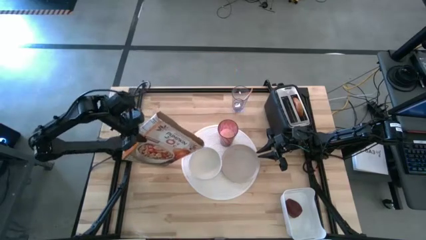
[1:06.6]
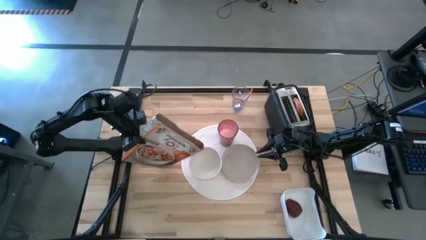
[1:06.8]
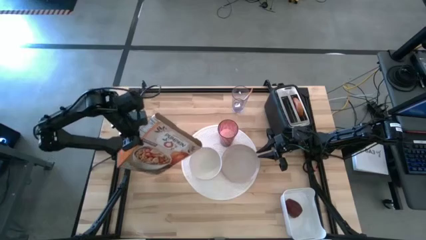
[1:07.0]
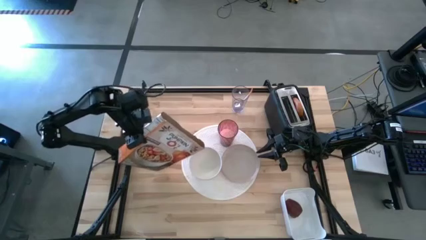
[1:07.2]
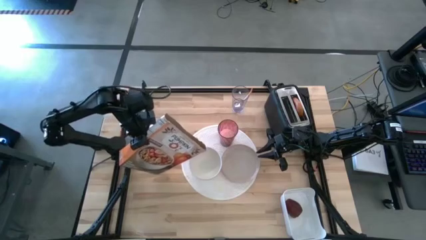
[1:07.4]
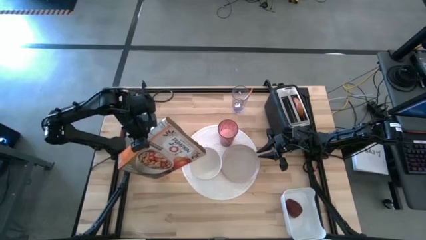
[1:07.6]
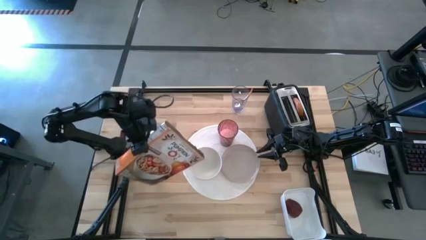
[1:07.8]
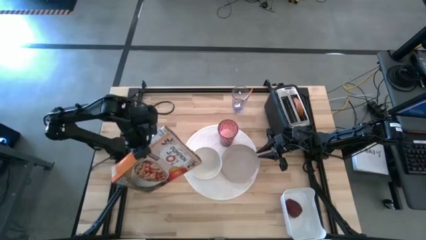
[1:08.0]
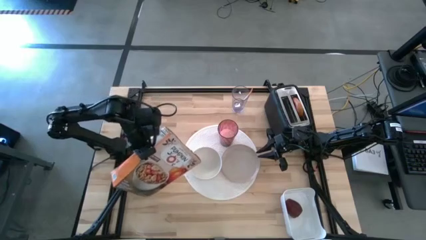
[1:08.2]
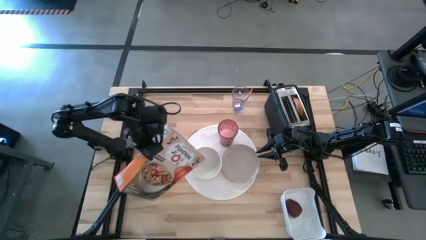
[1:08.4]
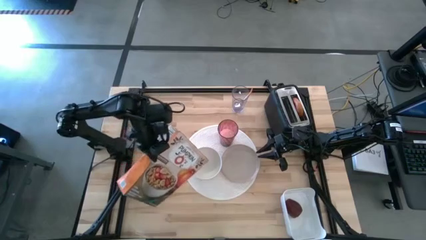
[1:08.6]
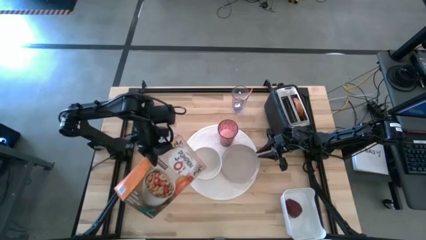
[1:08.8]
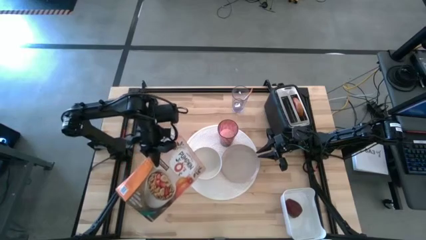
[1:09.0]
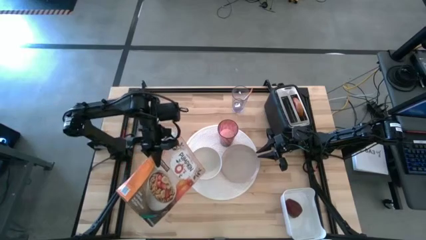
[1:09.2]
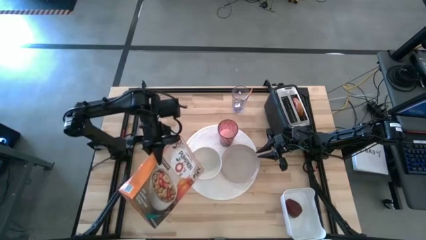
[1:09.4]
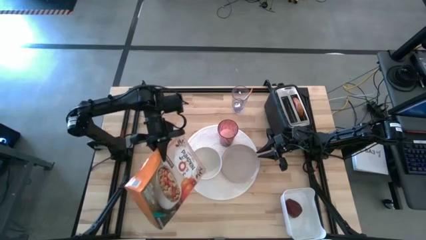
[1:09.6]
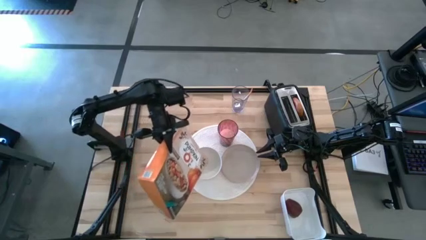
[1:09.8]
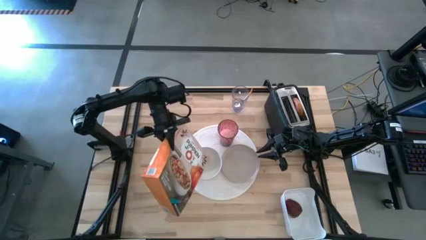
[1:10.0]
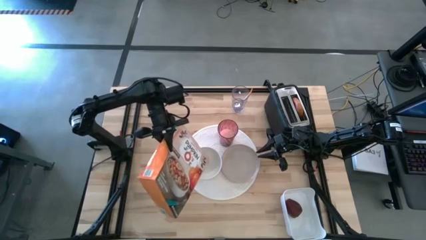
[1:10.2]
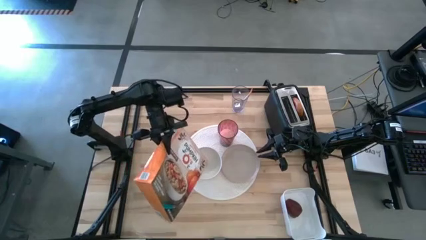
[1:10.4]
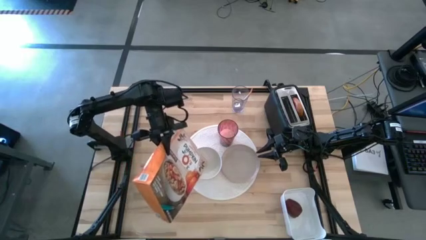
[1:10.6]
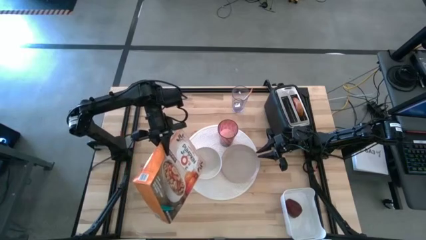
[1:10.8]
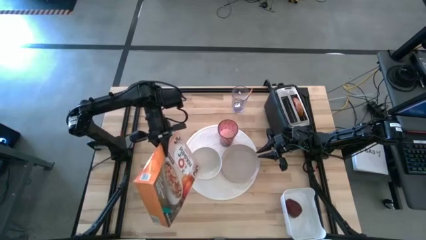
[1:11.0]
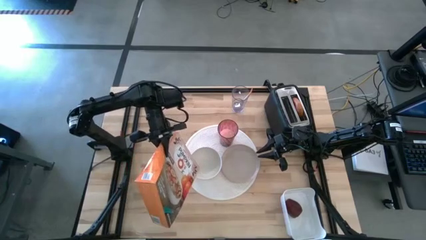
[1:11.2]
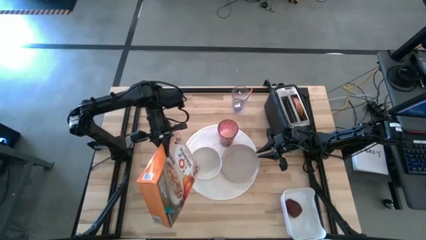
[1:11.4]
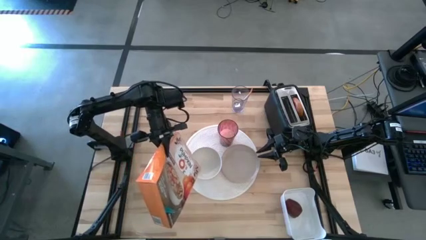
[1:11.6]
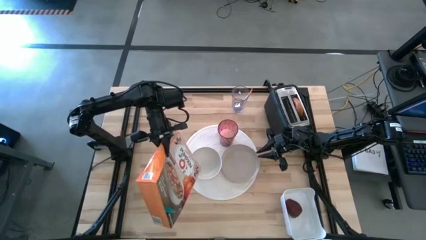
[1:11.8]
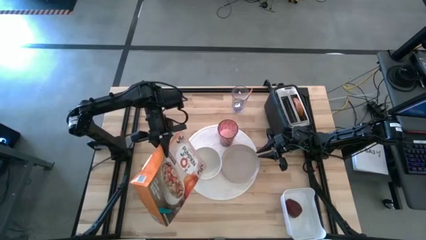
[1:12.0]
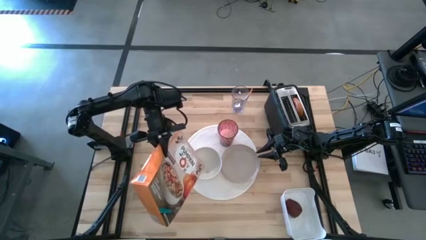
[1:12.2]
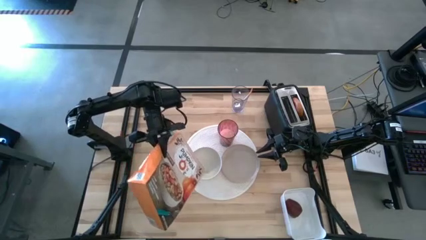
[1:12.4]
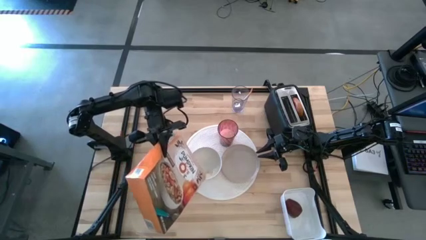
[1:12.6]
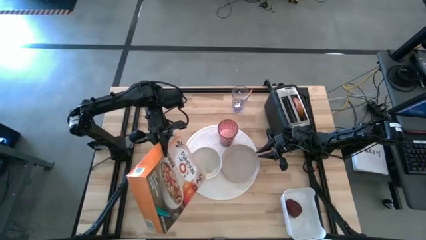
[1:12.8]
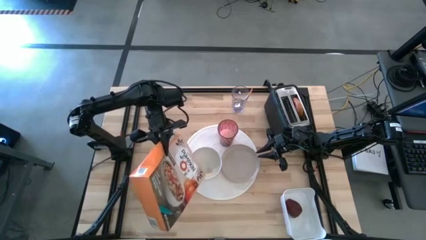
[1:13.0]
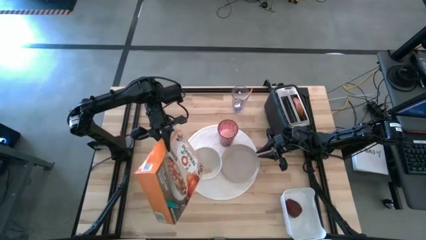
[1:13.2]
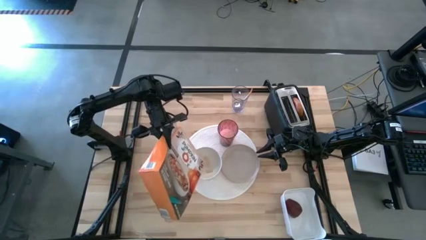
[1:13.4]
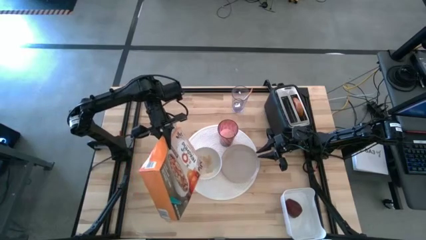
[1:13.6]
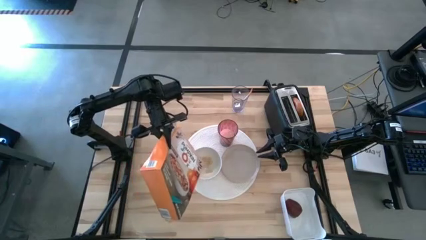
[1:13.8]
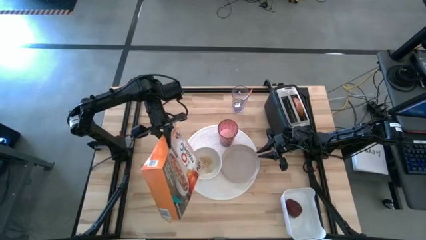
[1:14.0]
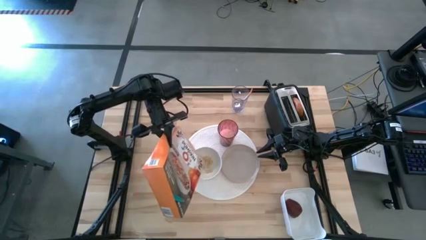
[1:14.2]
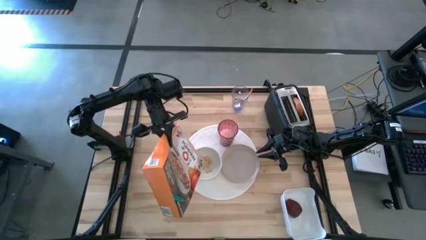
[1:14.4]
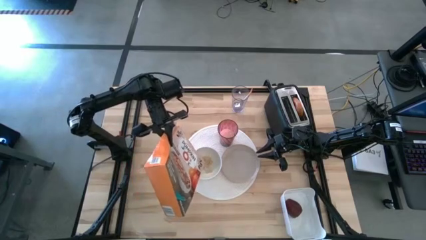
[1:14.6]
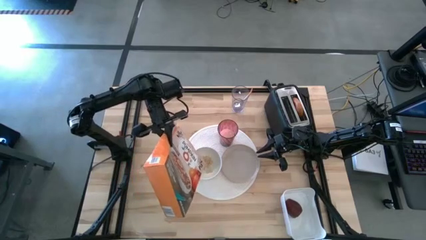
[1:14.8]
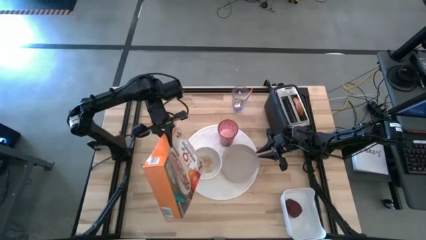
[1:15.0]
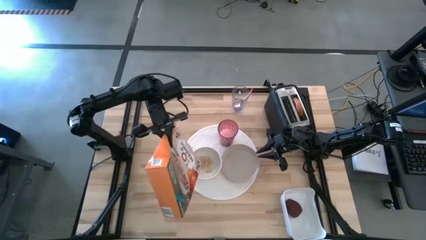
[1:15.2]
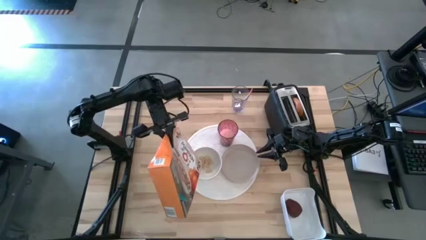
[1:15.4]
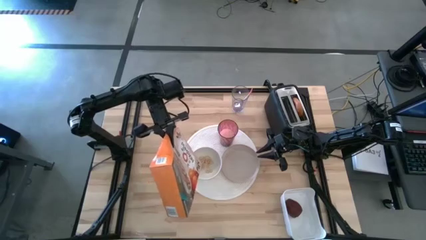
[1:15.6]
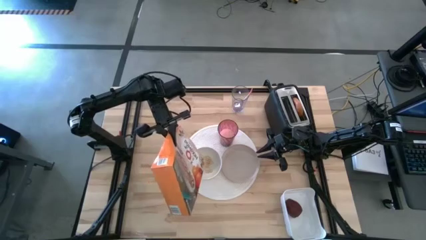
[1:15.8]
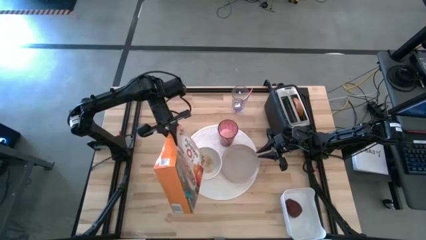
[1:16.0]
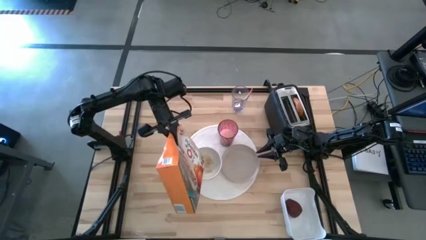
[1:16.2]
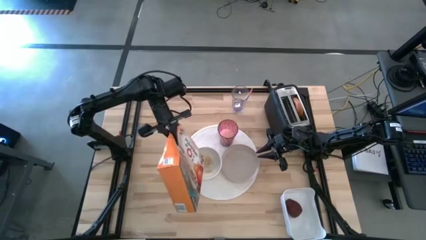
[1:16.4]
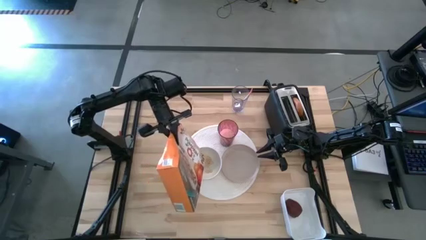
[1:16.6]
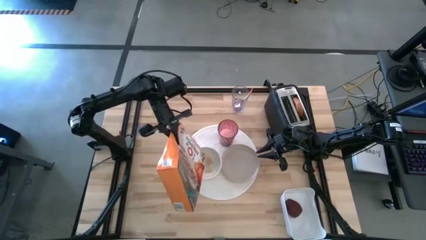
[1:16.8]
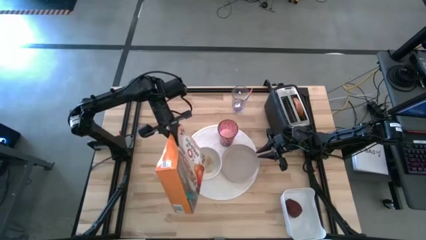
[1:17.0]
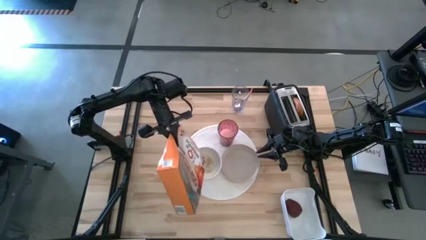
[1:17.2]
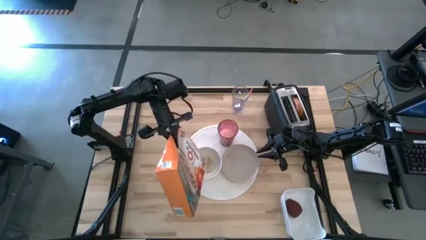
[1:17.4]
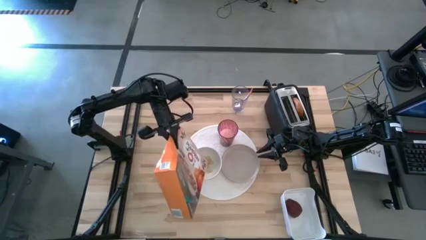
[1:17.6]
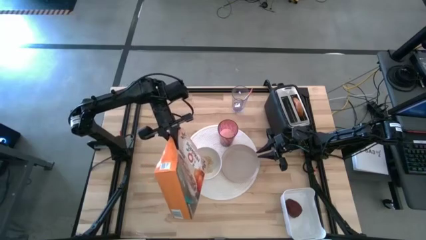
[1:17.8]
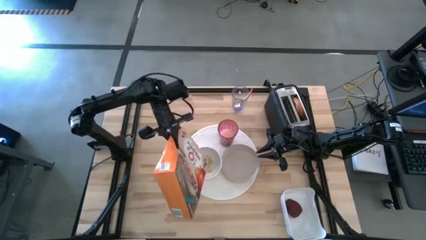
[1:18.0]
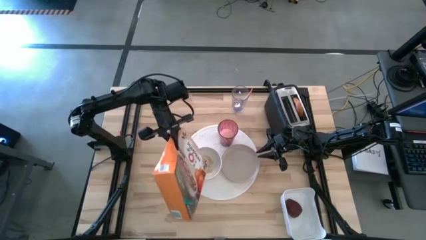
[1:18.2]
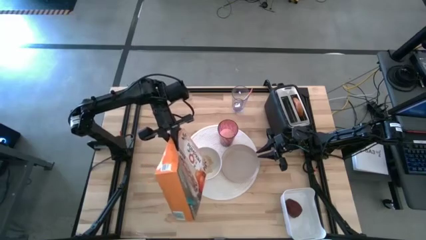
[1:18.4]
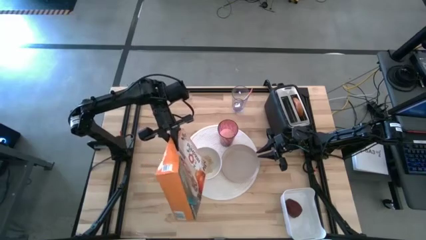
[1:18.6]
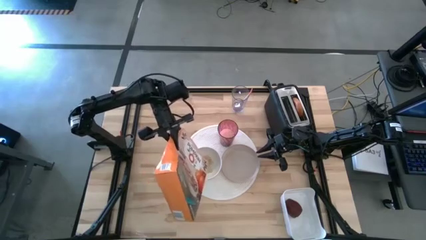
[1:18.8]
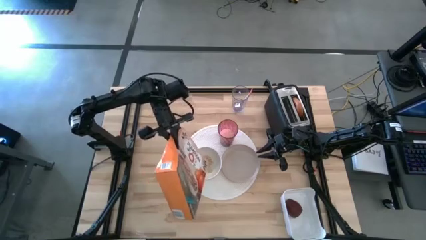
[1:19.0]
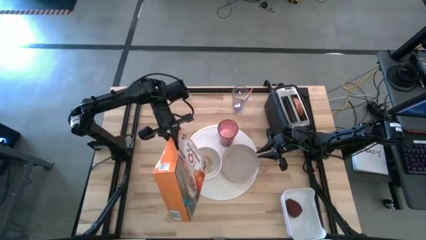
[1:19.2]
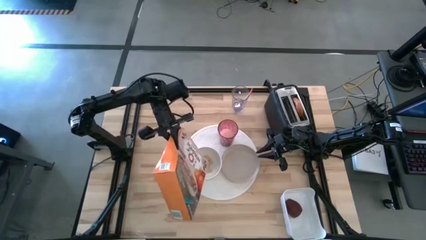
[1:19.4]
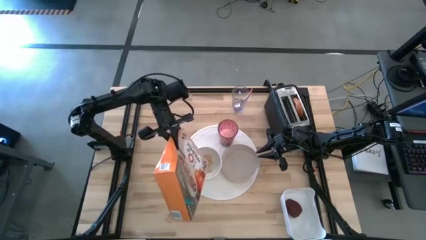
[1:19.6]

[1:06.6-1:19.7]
Task: Arrange a breakfast setting
Pour the cereal from the cereal box into the white bowl

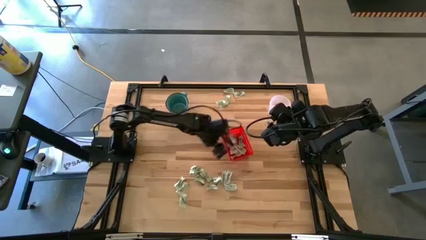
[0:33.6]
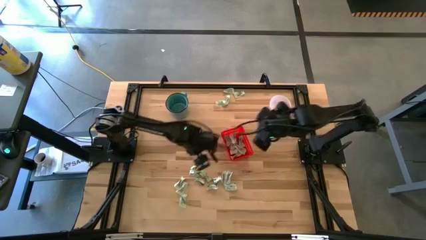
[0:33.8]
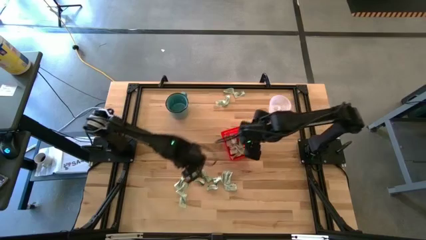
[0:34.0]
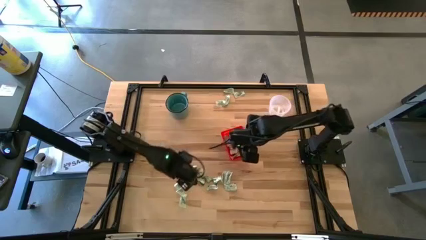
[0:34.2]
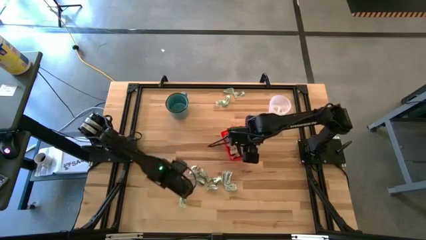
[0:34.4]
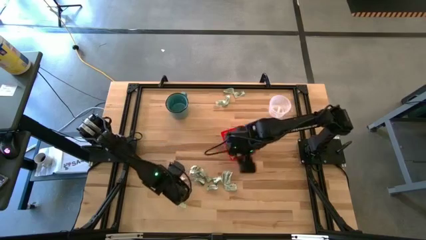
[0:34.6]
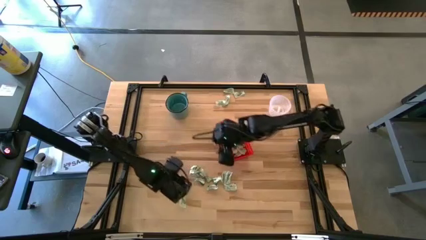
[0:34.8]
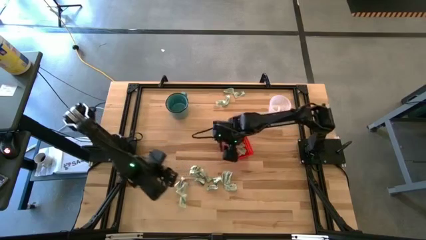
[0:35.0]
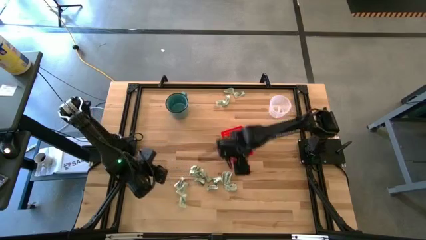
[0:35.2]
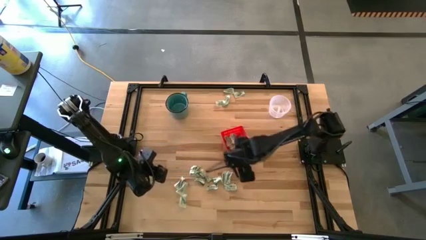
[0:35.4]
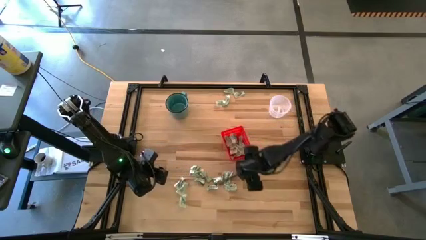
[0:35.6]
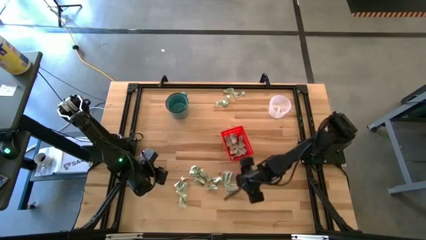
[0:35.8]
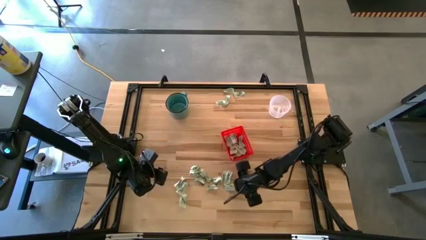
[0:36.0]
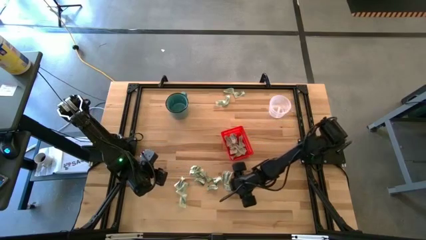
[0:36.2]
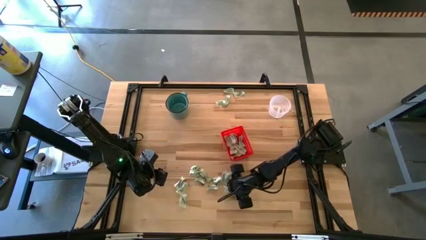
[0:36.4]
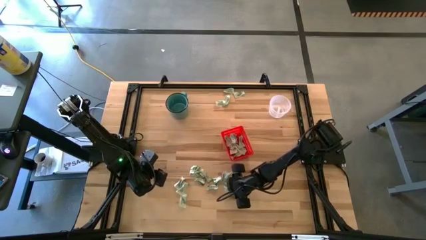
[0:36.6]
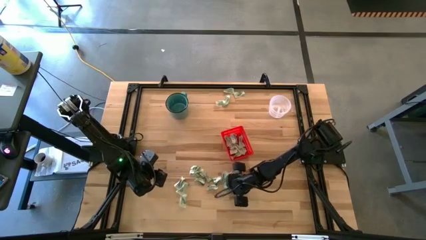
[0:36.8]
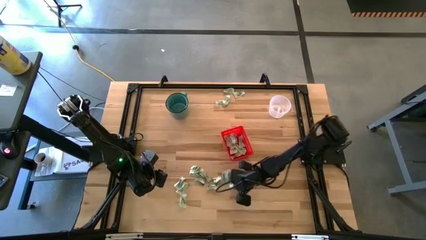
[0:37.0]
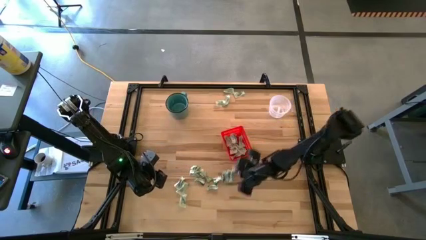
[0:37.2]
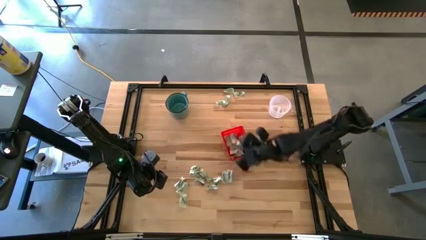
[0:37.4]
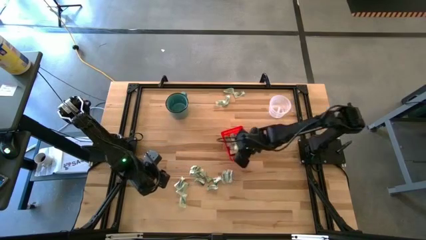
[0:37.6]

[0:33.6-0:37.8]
Task: Pick and place items into bin
Put the stevia packet into the orange bin
